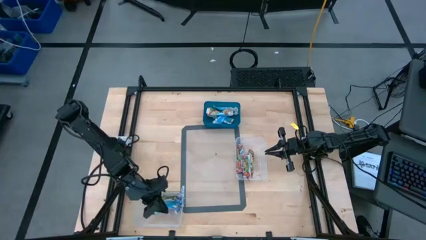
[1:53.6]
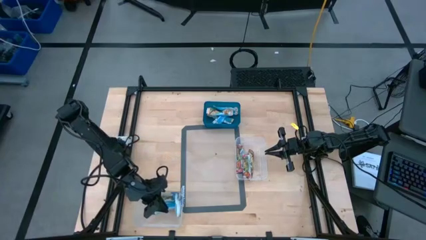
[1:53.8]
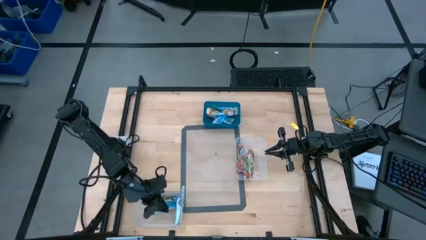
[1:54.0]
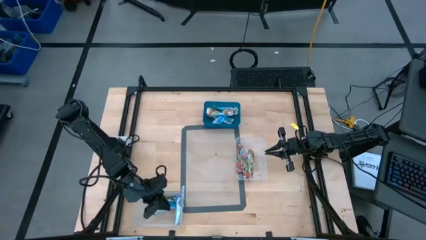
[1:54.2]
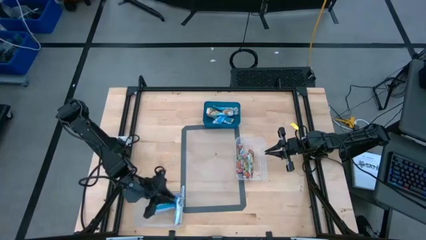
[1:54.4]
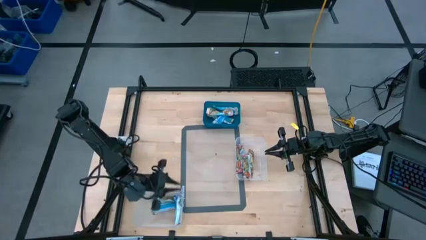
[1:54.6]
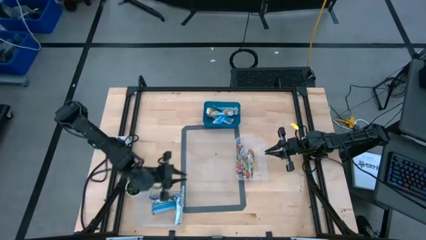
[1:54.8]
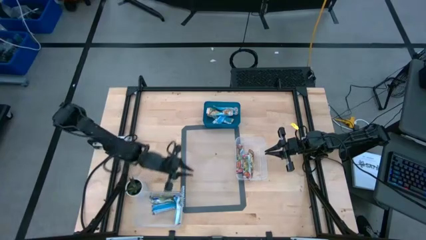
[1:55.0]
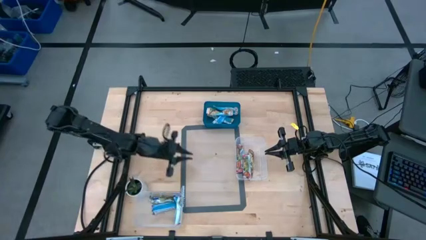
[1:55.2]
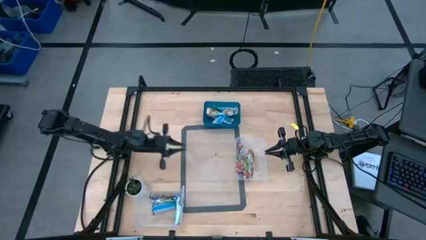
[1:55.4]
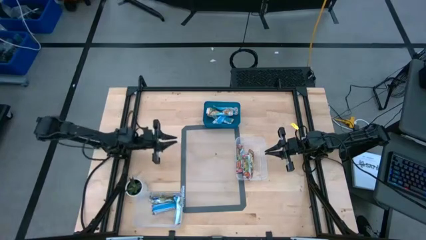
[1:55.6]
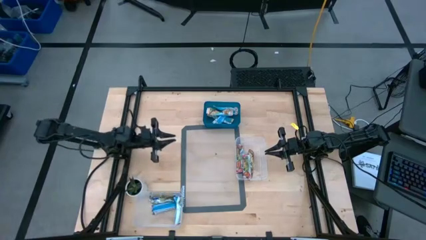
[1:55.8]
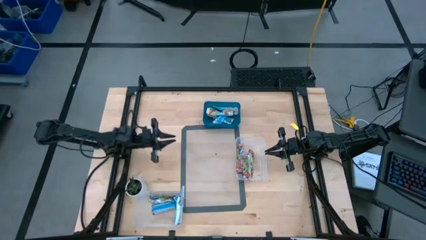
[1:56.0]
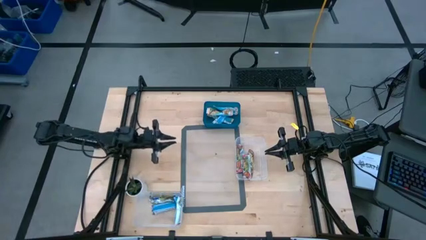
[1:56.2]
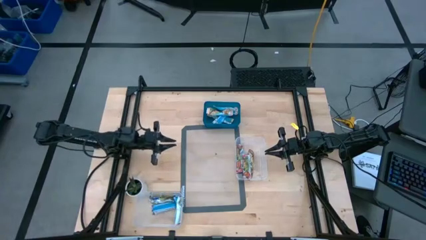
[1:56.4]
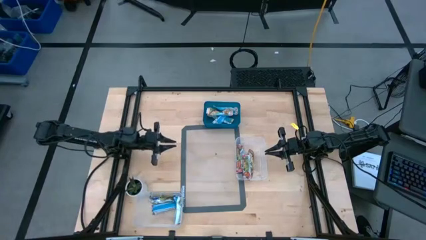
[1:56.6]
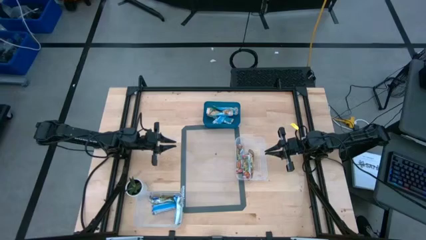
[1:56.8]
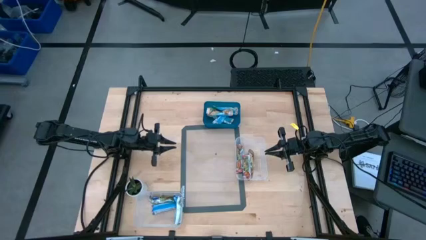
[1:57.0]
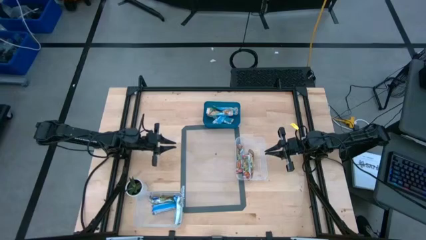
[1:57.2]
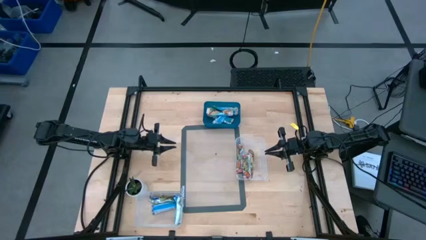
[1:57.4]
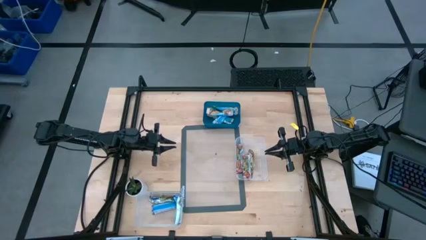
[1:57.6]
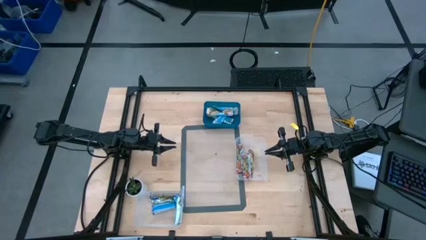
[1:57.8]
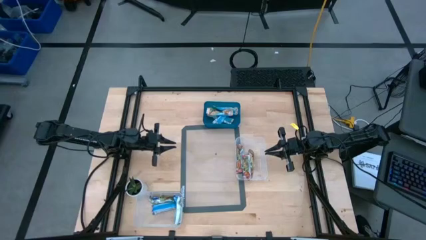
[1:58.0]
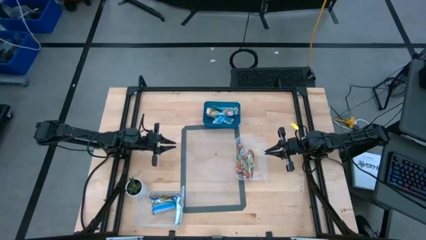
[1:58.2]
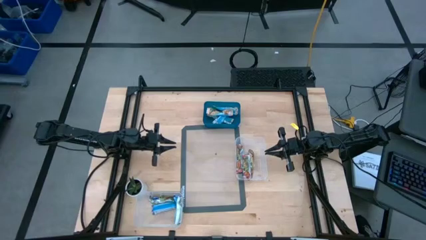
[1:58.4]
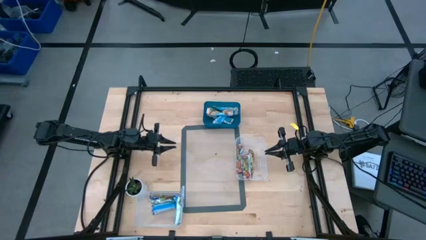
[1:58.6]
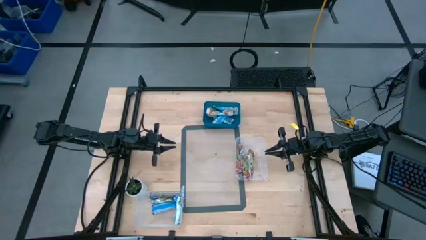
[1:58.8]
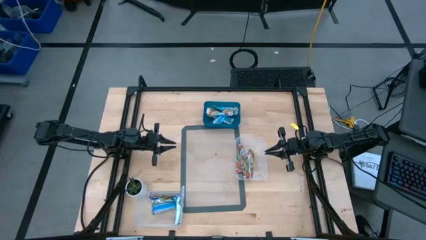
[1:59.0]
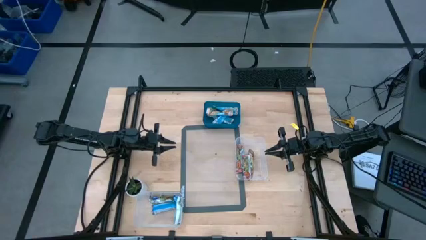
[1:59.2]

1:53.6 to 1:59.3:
Task: Pick and place Granola Bars by type
Return to Home Position

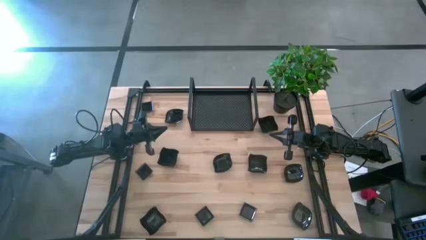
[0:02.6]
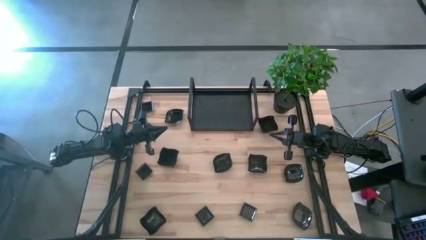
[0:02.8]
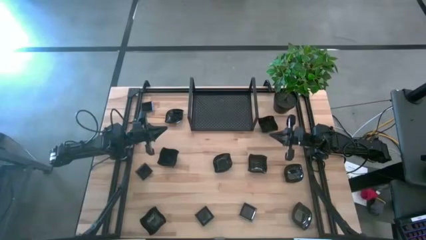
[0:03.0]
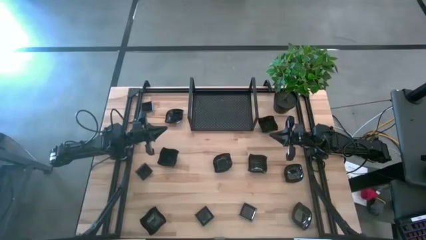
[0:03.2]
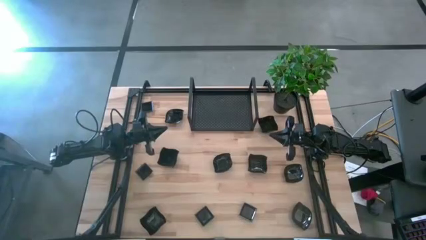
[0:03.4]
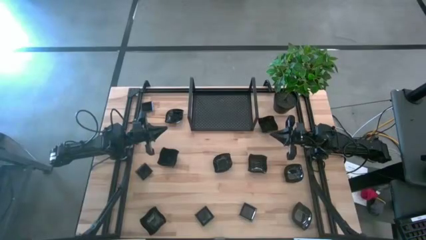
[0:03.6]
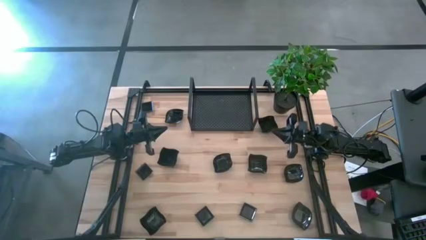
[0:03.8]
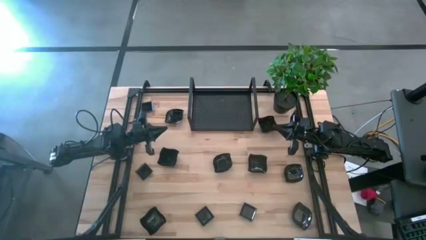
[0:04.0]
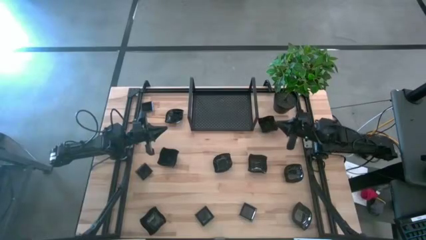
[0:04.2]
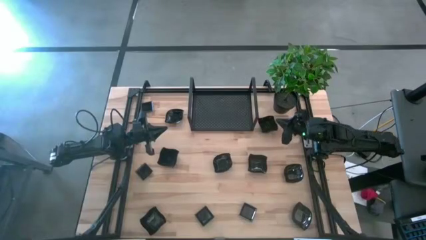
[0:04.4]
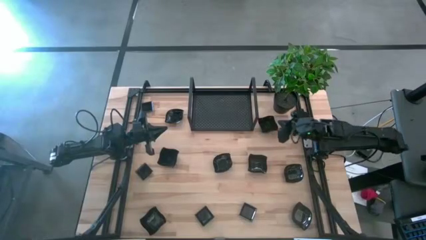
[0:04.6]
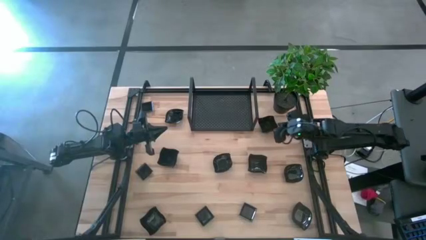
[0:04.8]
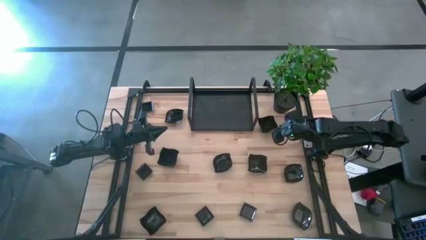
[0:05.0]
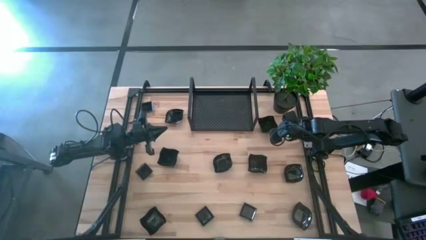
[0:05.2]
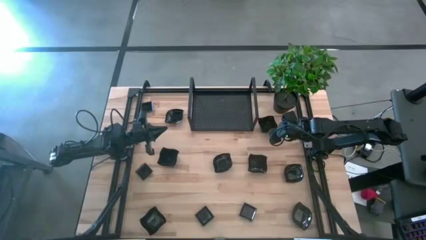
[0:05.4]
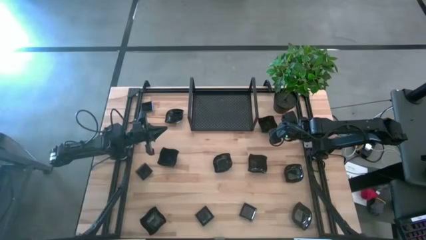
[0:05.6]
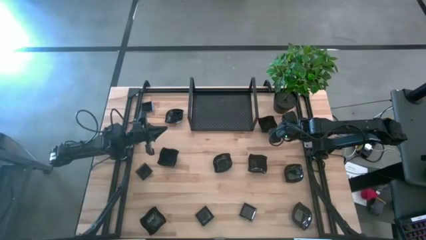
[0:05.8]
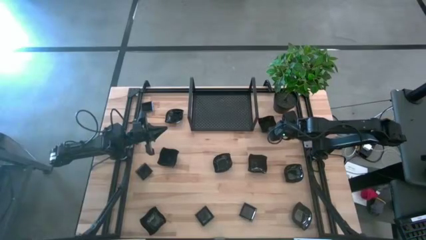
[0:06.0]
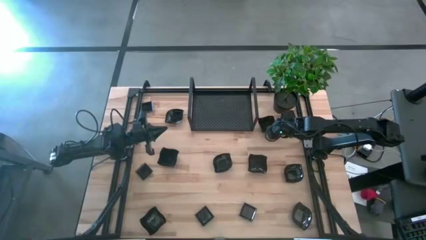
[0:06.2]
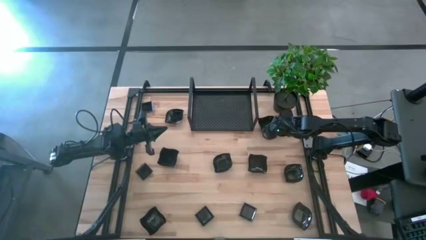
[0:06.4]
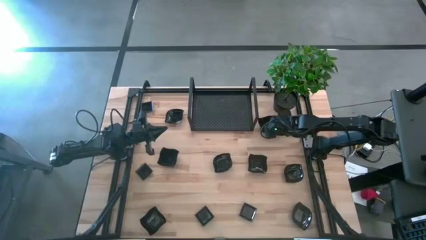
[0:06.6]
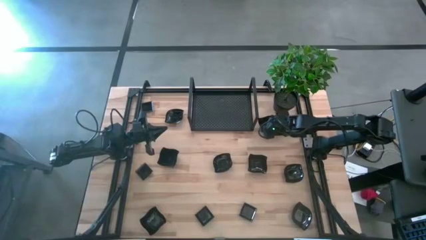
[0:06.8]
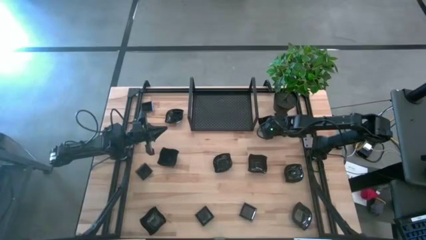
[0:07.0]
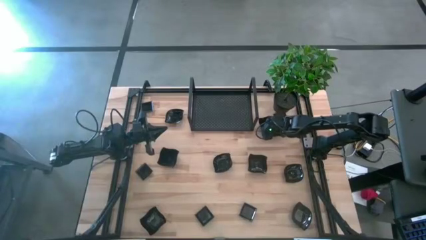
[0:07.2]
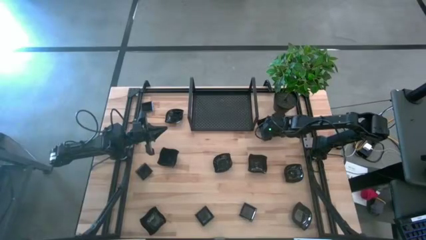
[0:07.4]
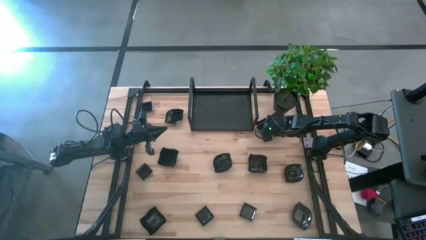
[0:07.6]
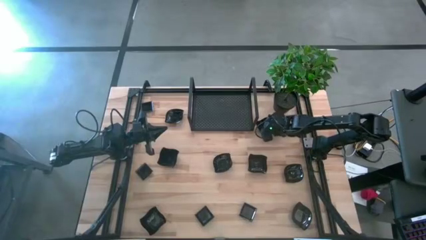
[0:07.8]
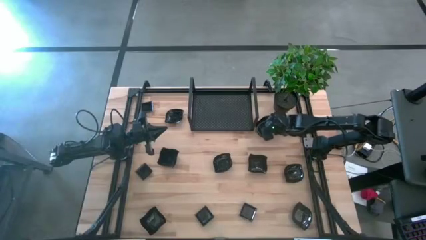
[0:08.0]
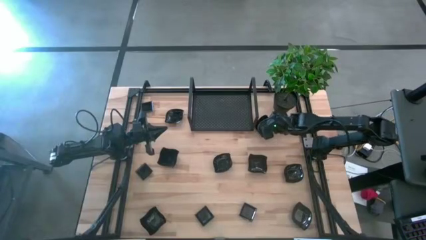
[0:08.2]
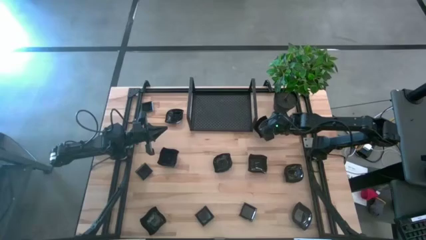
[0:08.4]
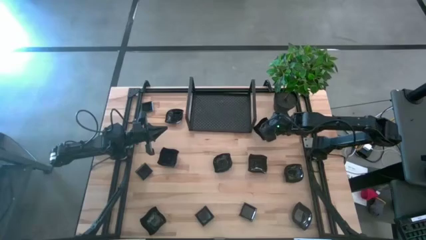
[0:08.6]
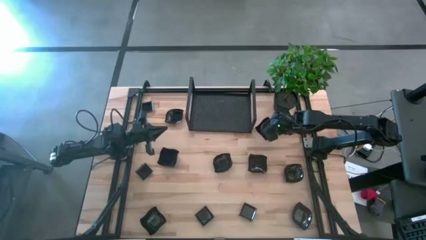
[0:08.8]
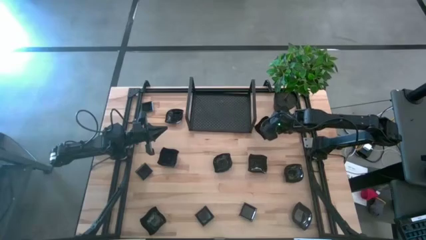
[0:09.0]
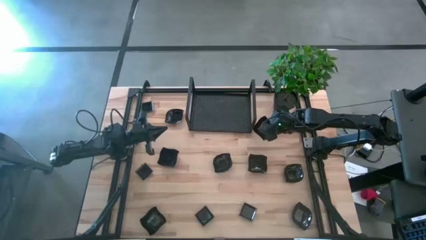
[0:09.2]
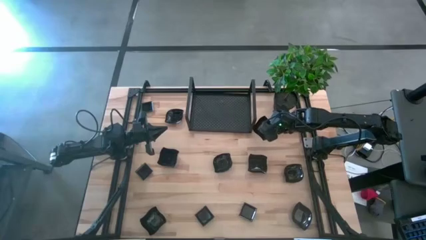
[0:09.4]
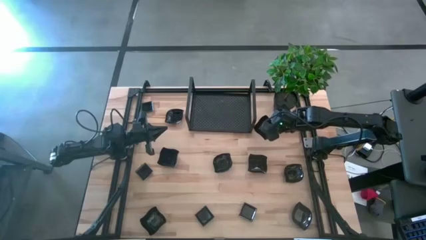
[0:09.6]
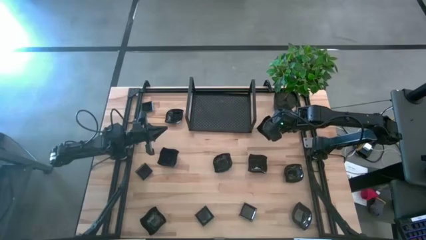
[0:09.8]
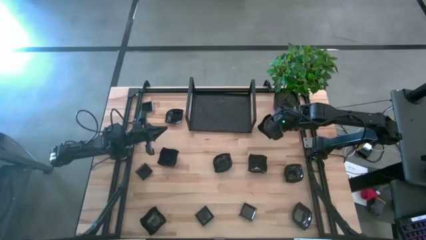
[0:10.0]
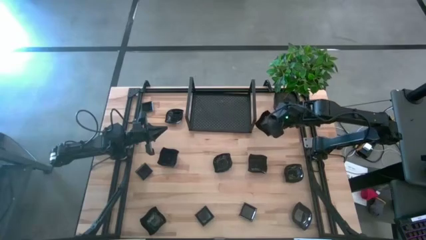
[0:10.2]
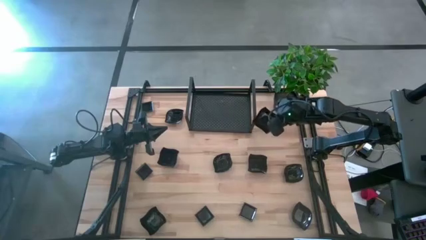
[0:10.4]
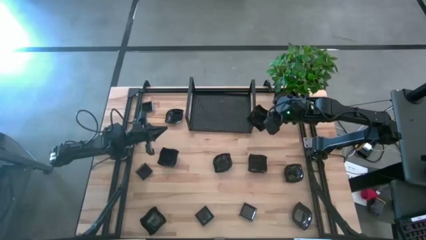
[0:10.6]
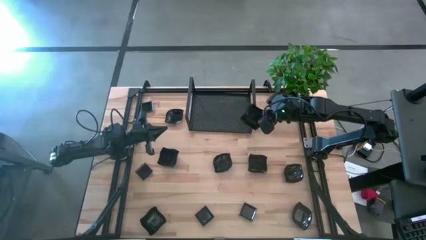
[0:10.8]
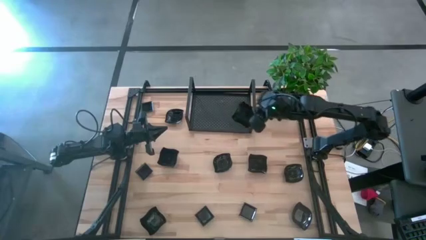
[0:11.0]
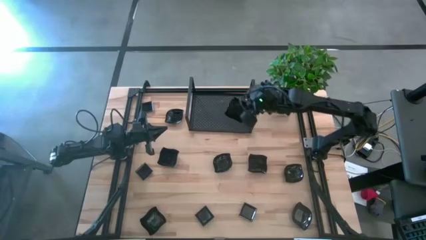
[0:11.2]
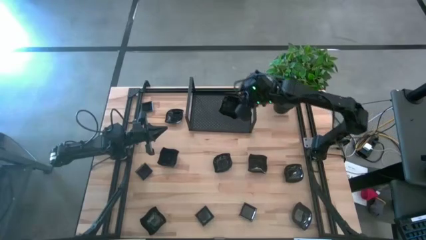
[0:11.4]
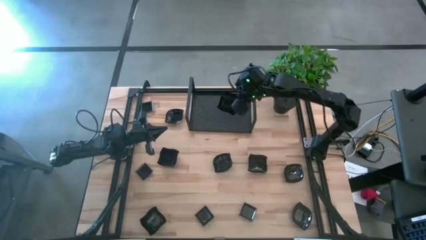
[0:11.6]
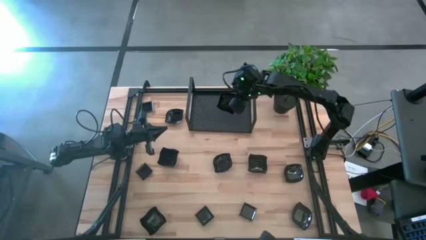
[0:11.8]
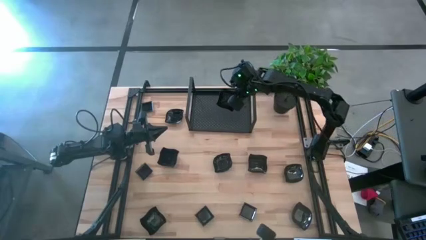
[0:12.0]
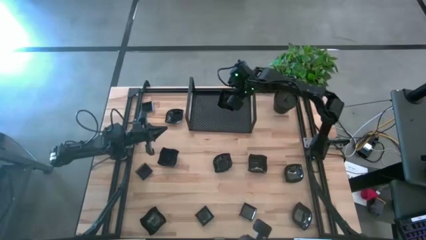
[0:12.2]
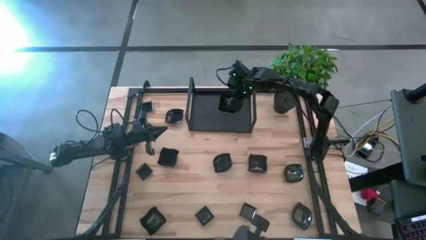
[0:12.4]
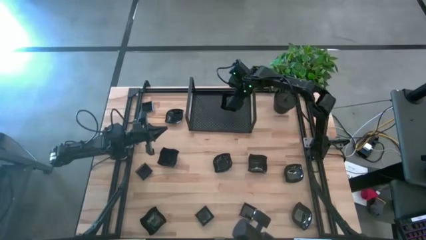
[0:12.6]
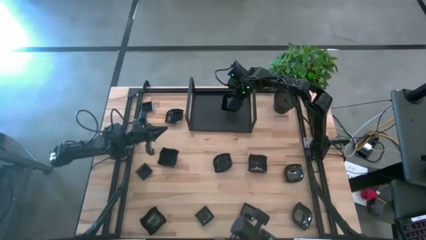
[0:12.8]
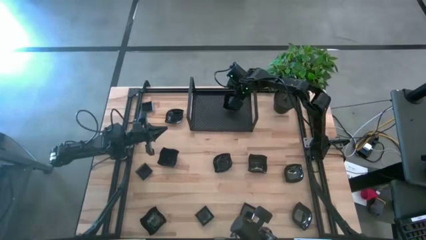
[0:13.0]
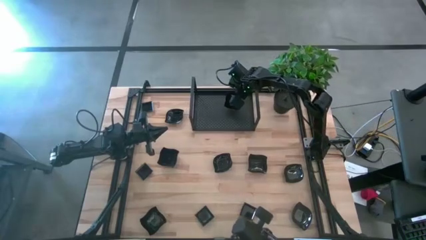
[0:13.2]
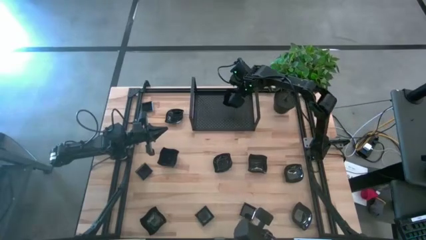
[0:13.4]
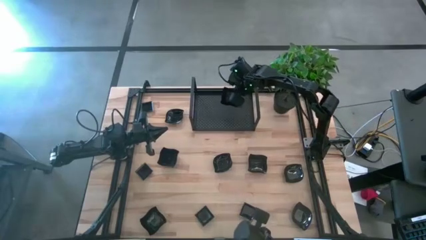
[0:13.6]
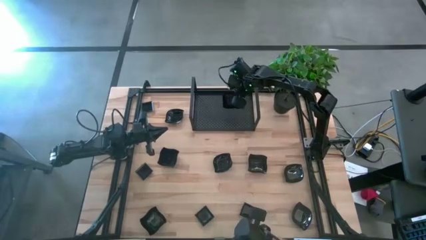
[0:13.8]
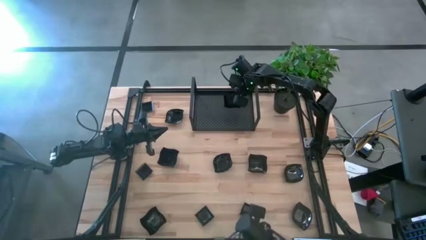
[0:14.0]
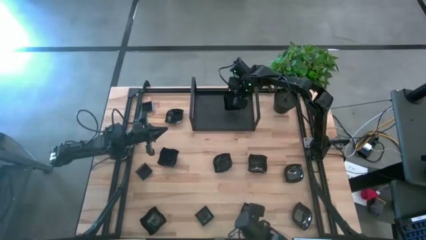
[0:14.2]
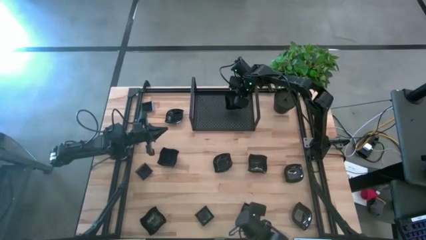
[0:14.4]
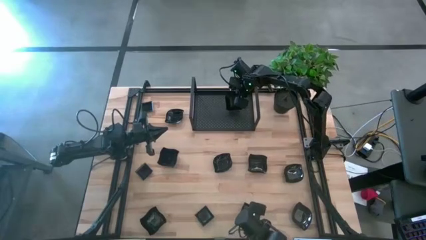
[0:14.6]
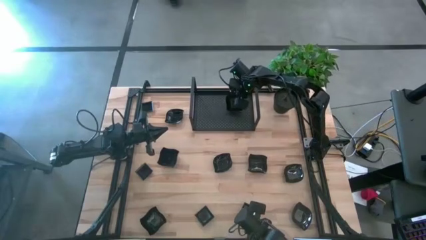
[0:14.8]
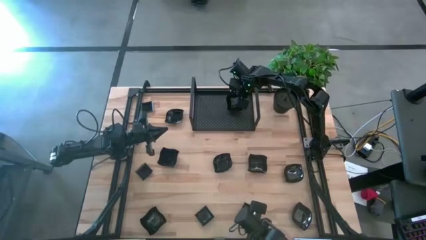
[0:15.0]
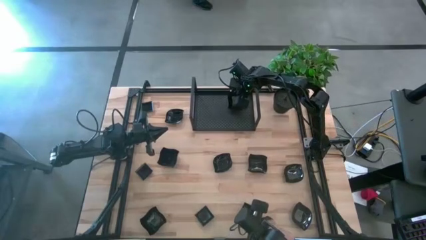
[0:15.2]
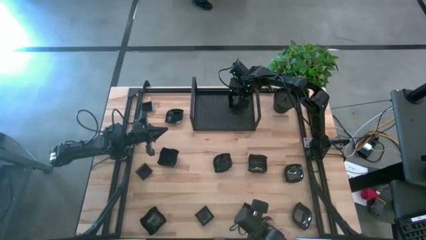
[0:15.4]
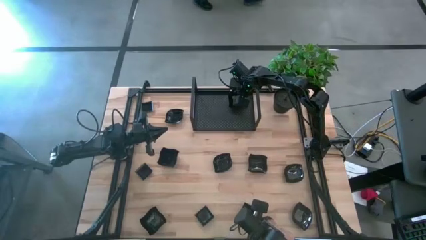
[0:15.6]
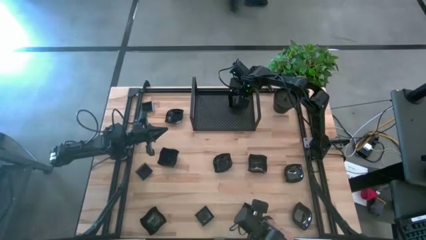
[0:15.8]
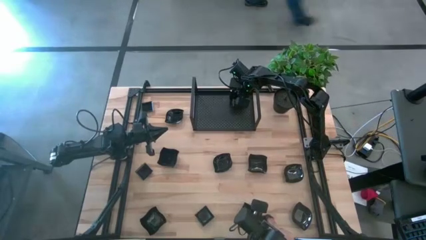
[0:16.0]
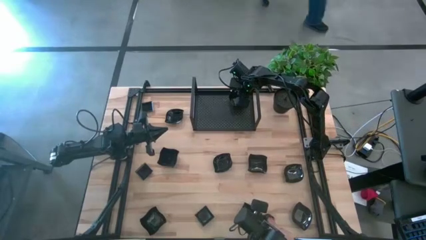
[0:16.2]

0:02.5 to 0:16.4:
Task: Pick & Place Mini shaped plates
Put the black distorted square plate on the shelf
